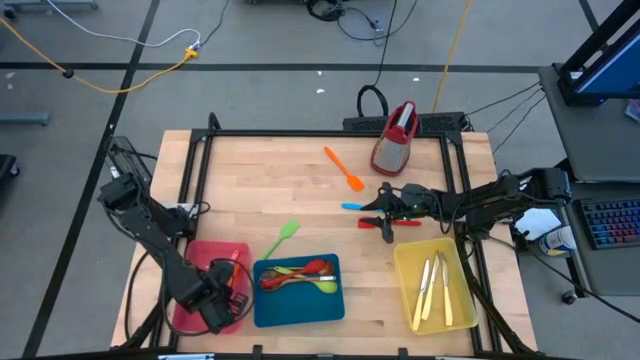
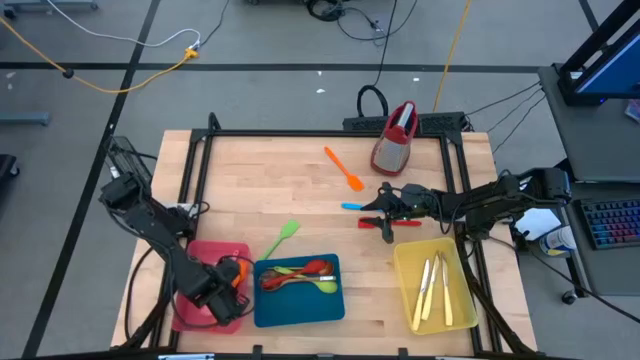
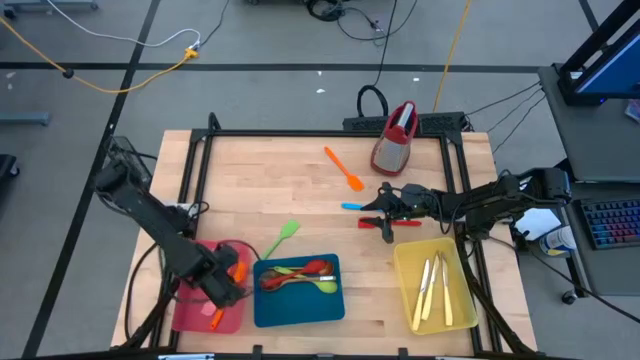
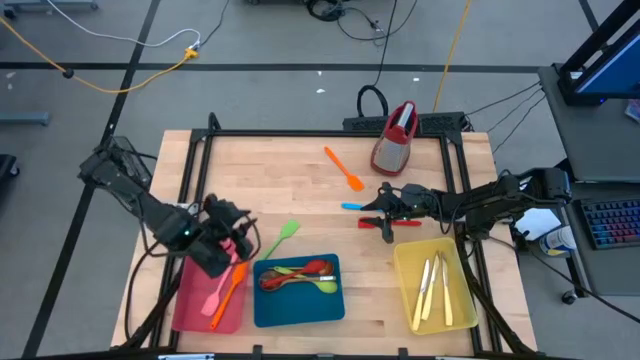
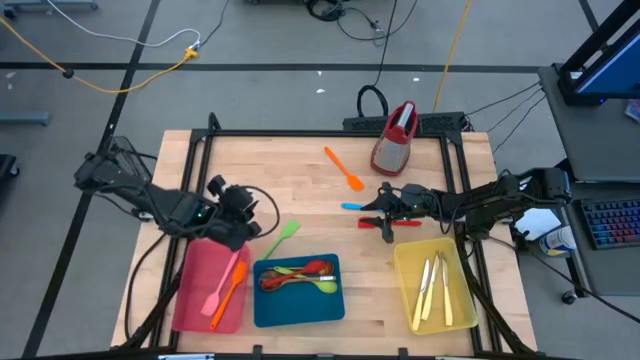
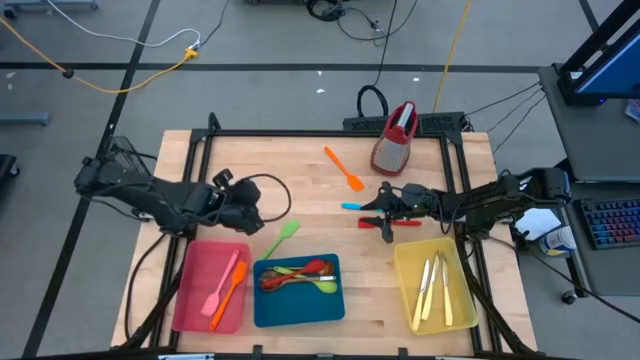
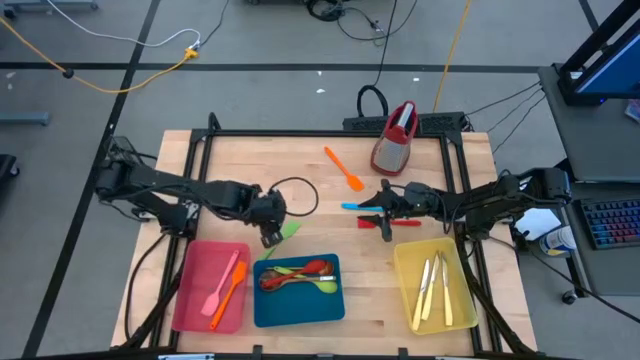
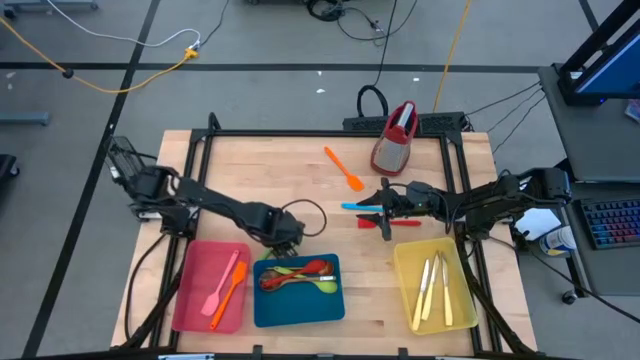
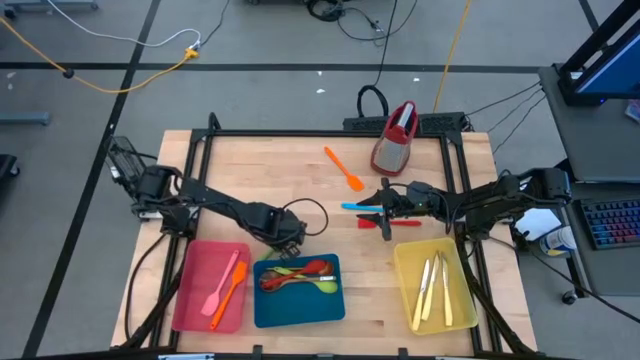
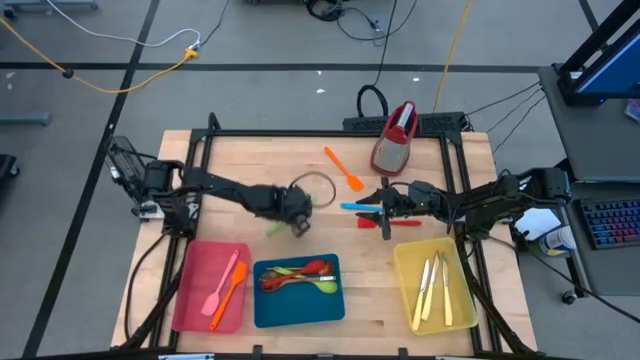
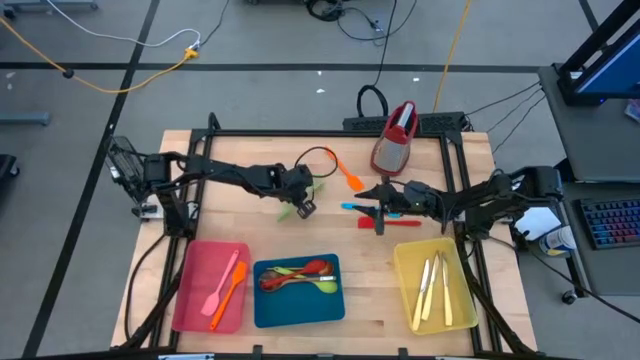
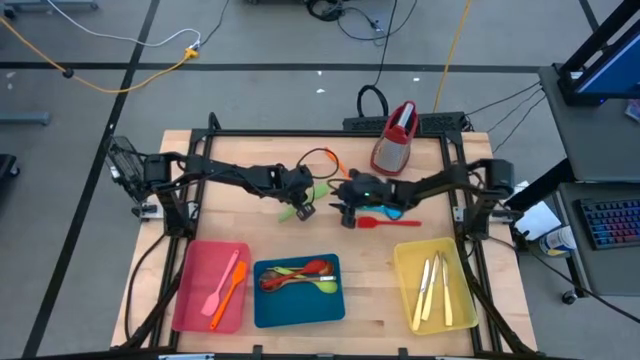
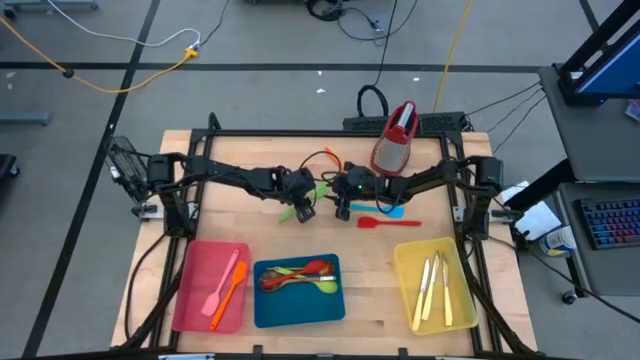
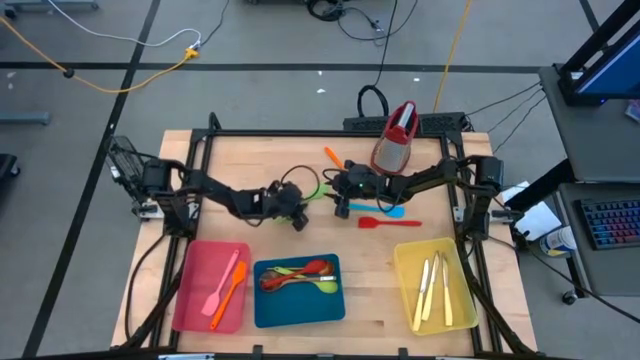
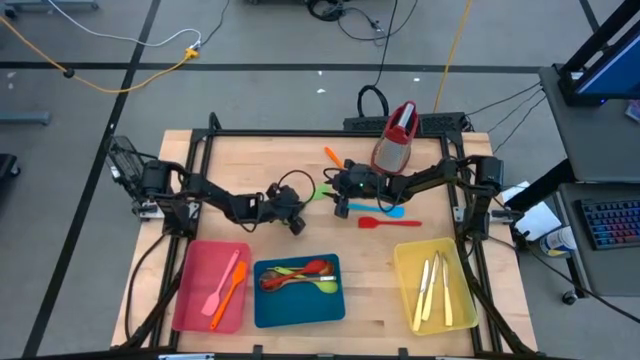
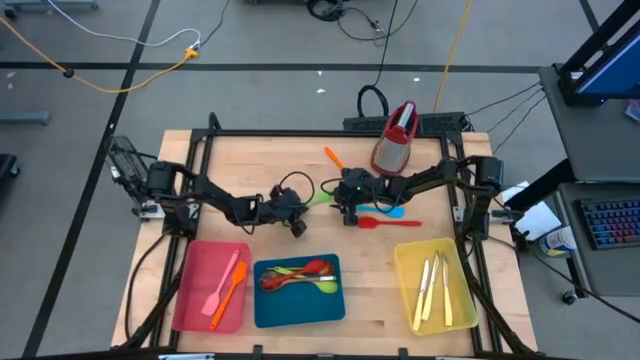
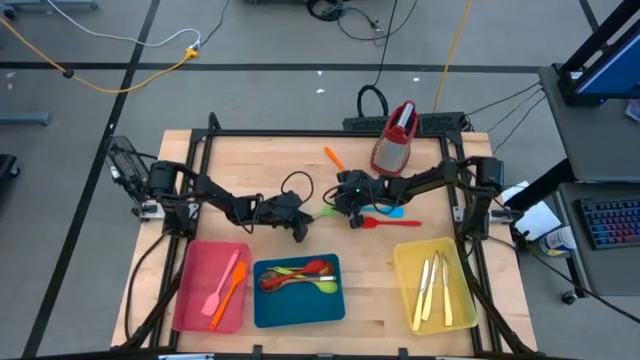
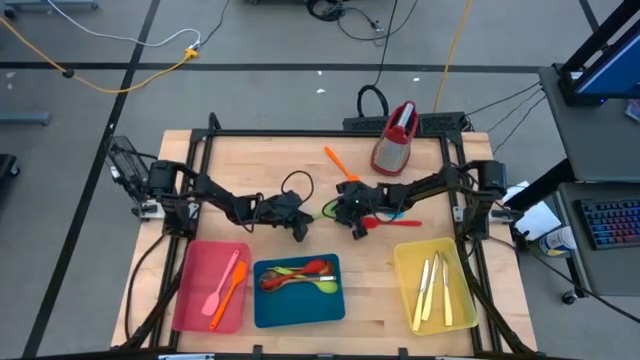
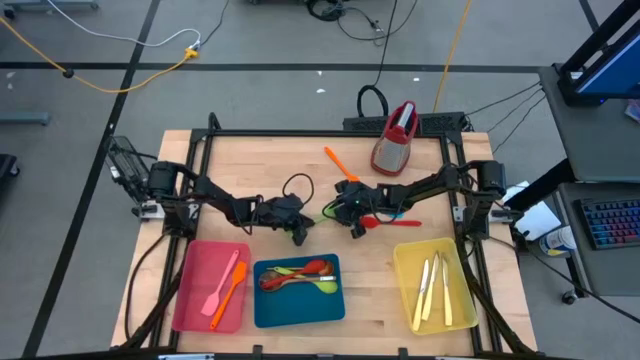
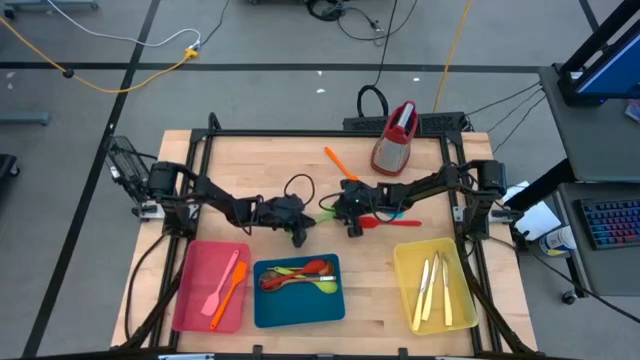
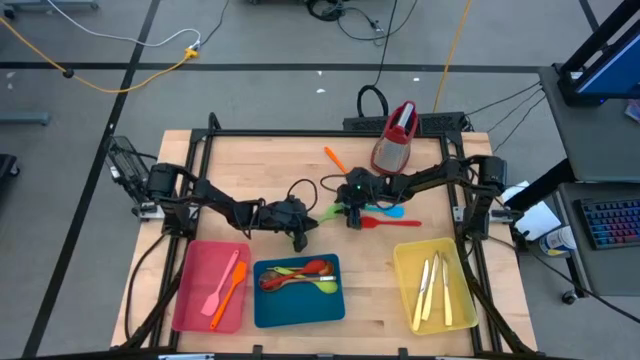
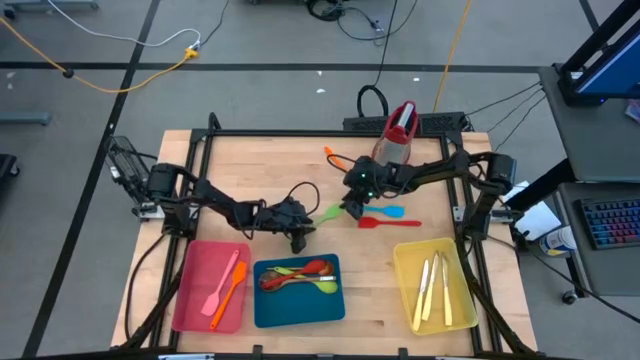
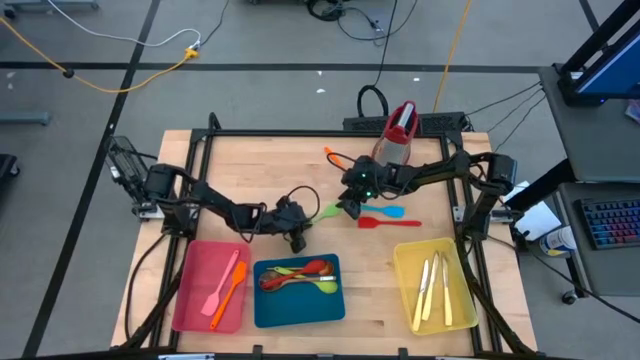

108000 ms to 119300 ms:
Task: Pick & Place Kitchen Items
Put the green spatula into the pink bin

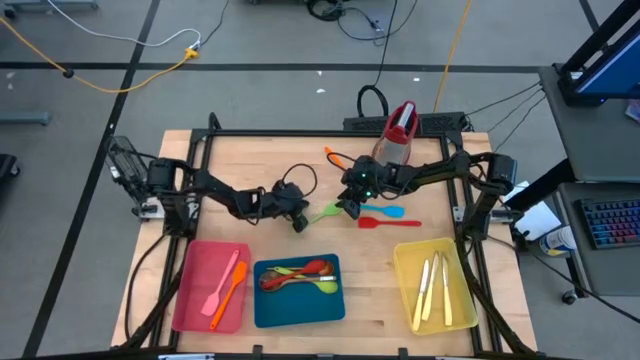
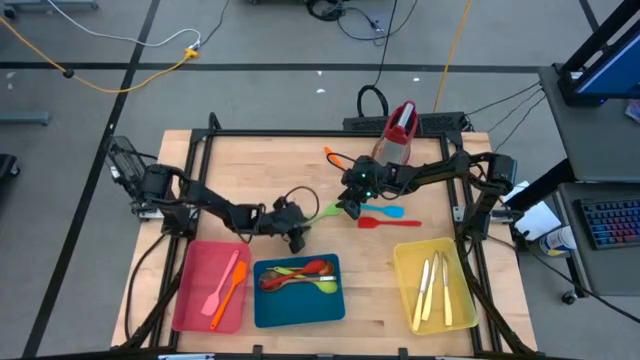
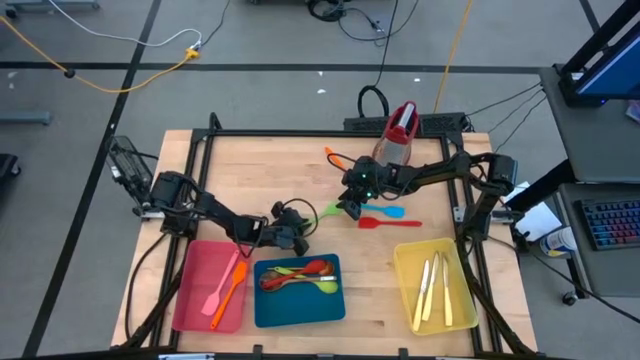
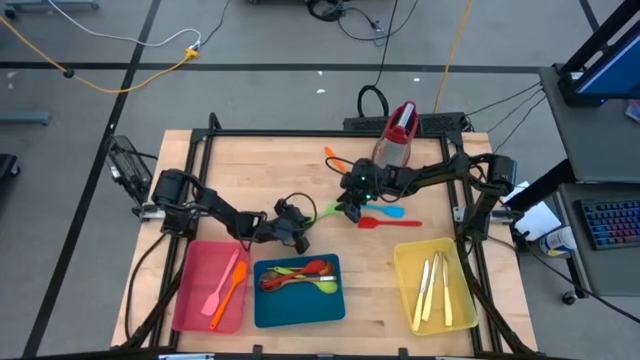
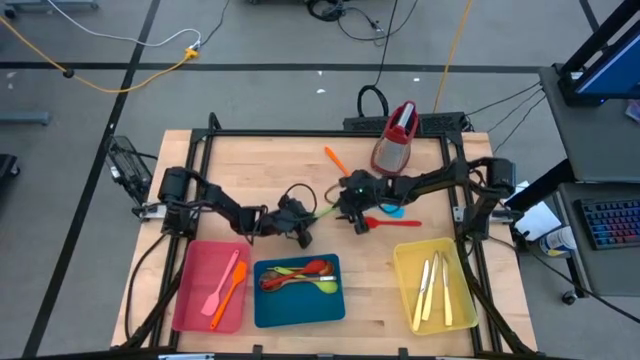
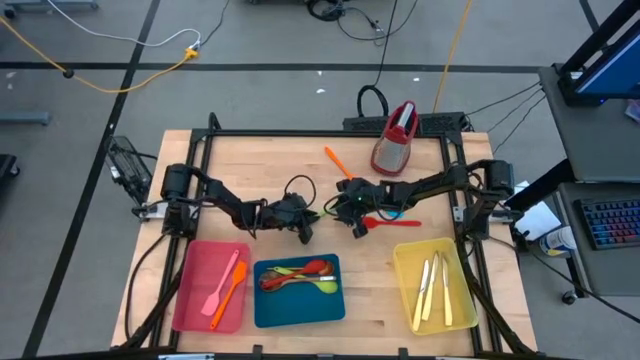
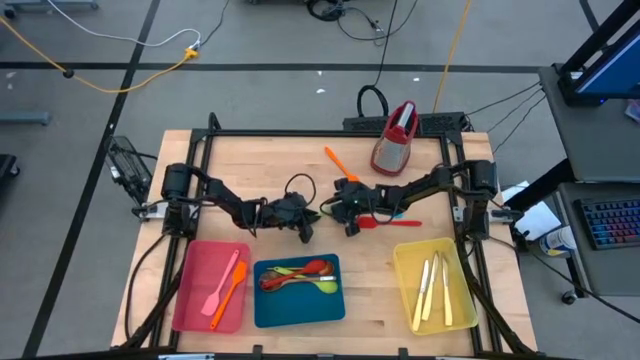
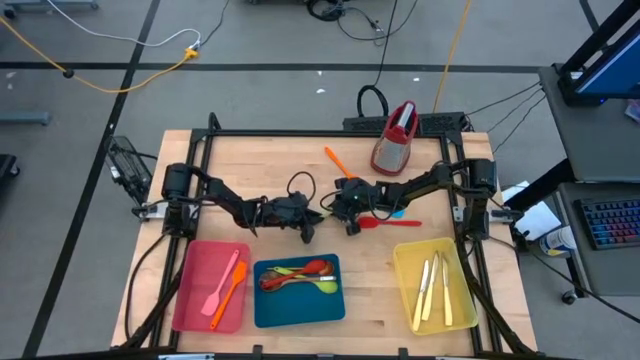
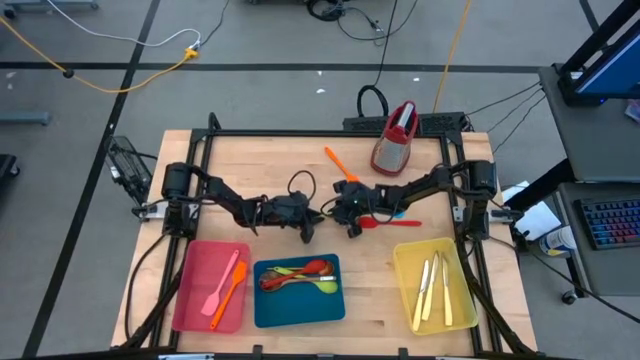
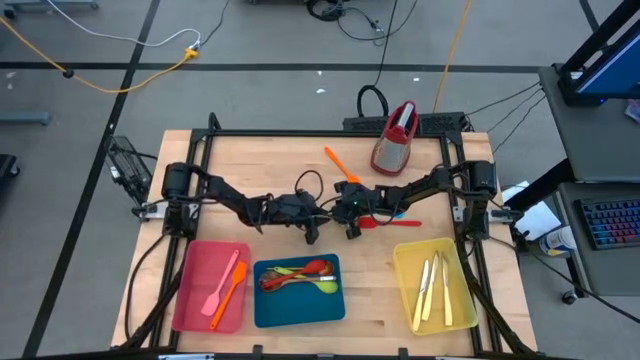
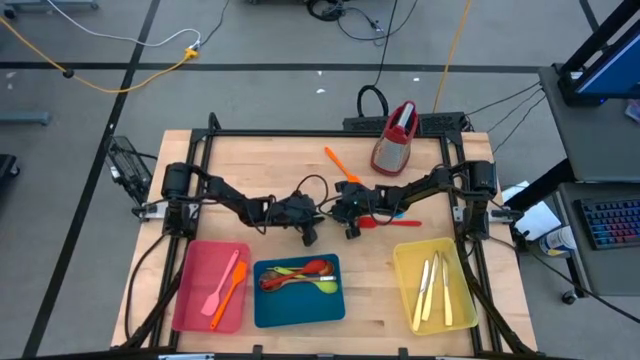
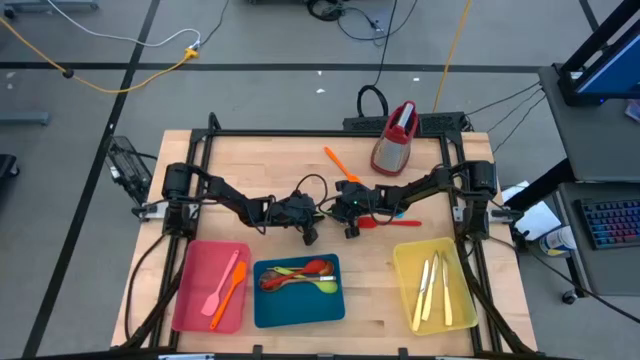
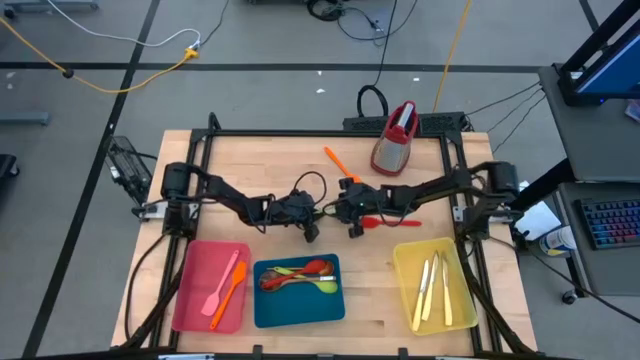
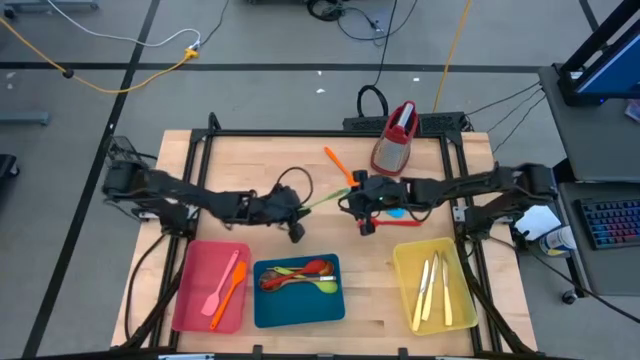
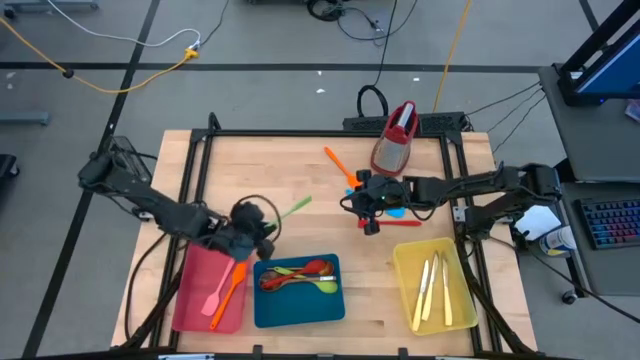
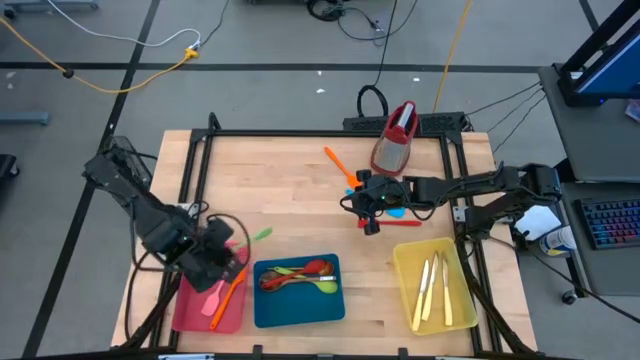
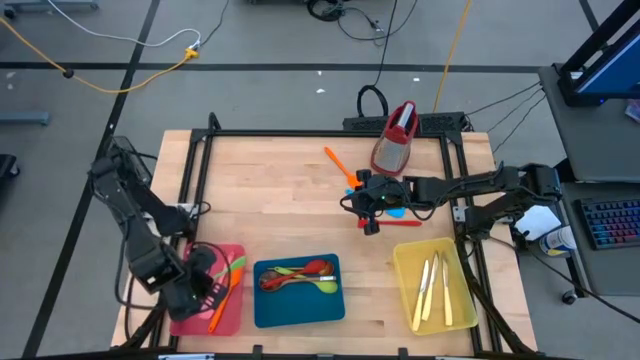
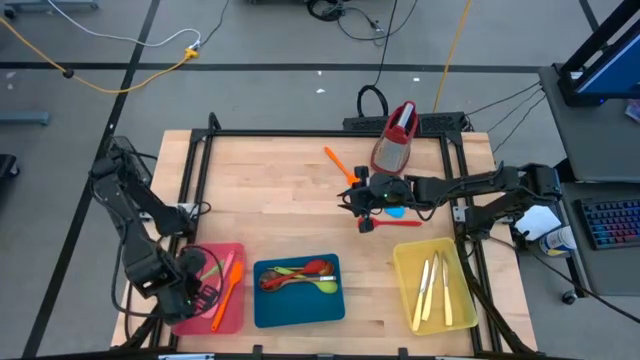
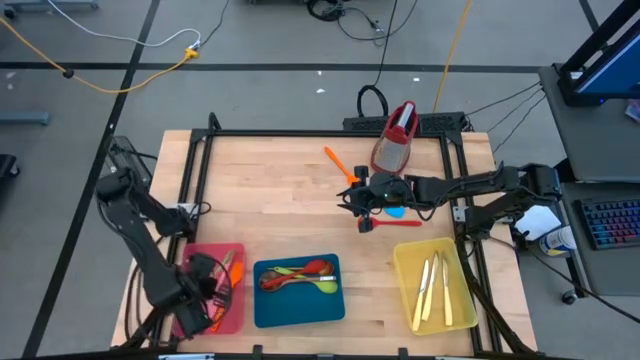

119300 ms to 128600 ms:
Put the green spatula into the pink bin
